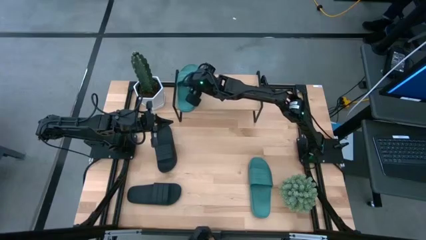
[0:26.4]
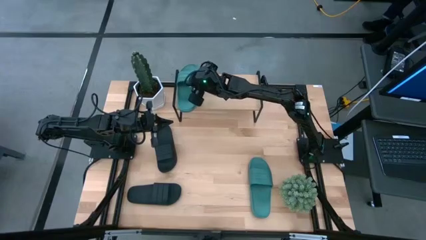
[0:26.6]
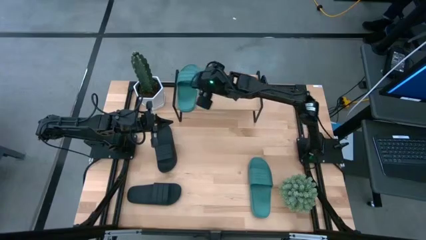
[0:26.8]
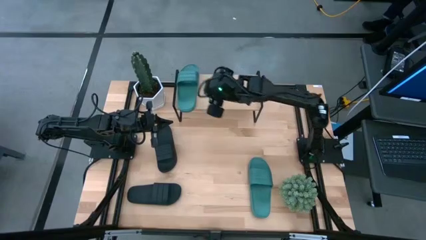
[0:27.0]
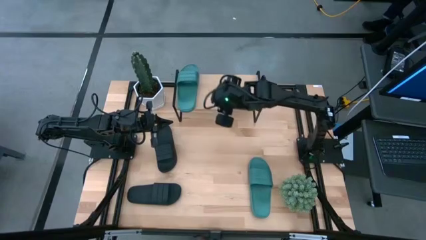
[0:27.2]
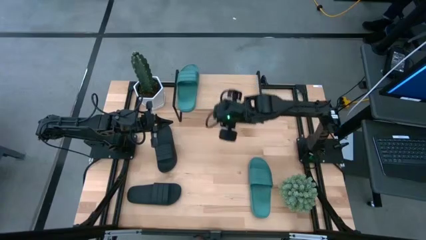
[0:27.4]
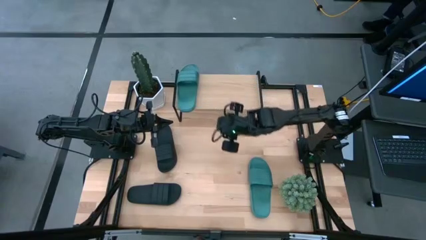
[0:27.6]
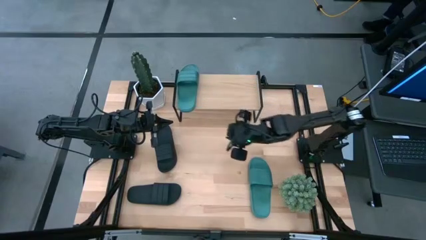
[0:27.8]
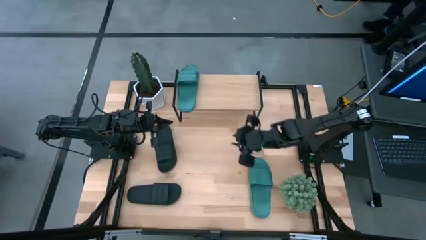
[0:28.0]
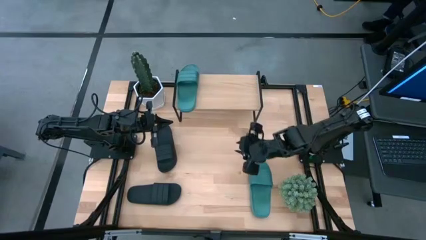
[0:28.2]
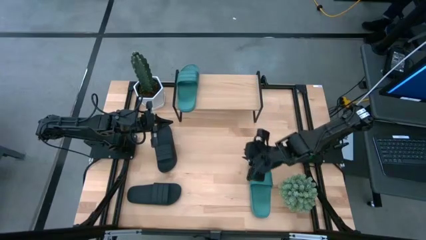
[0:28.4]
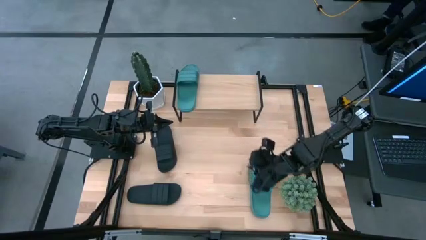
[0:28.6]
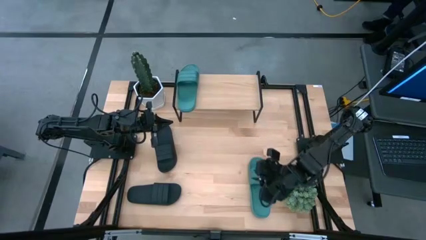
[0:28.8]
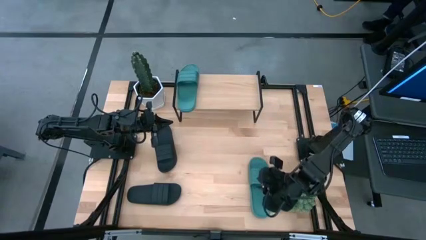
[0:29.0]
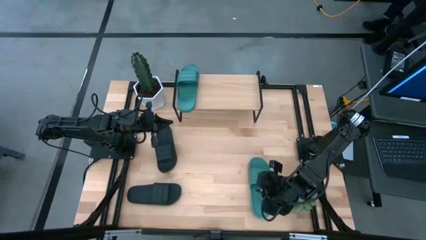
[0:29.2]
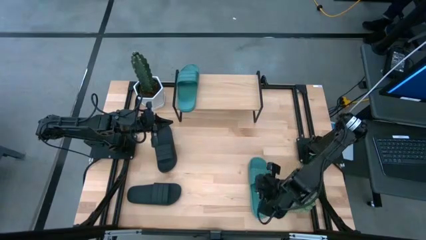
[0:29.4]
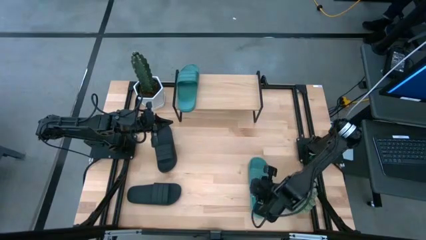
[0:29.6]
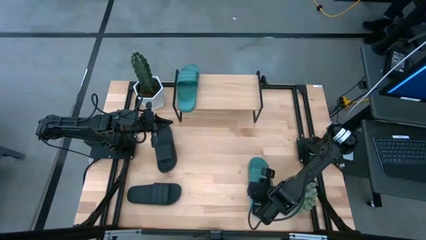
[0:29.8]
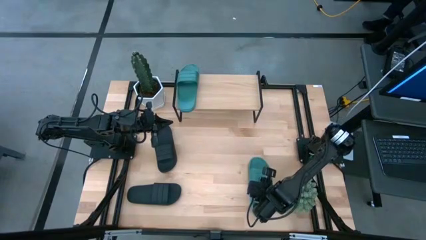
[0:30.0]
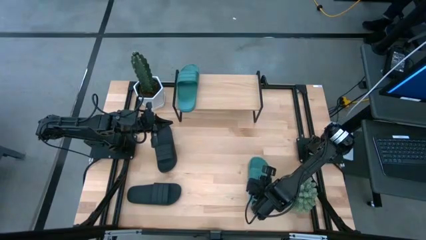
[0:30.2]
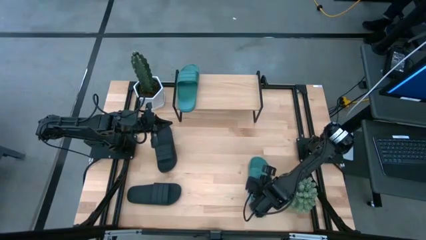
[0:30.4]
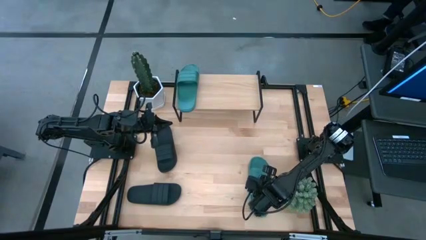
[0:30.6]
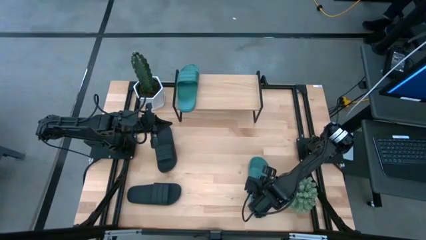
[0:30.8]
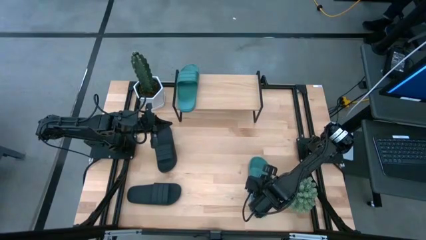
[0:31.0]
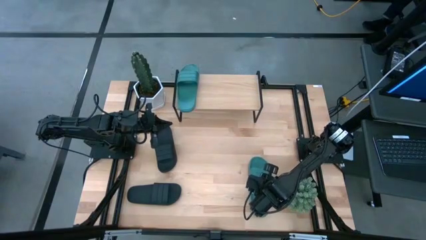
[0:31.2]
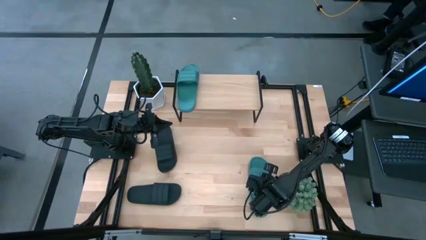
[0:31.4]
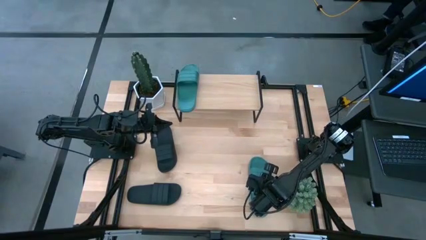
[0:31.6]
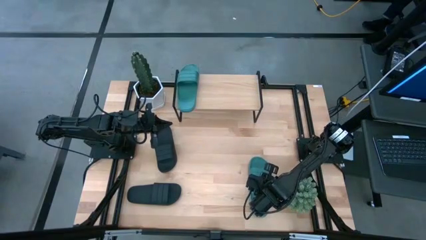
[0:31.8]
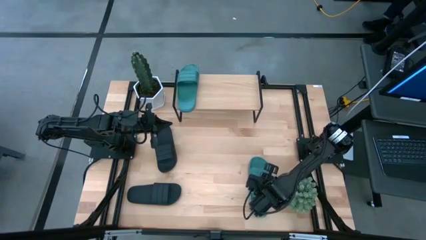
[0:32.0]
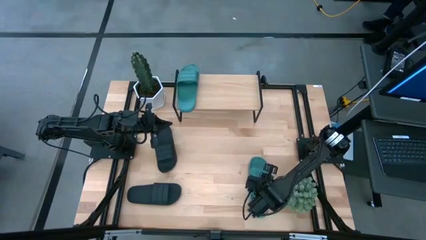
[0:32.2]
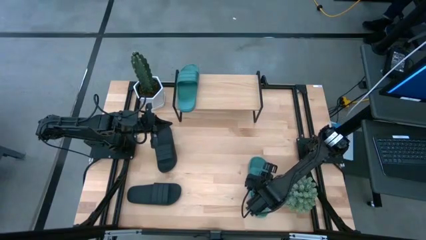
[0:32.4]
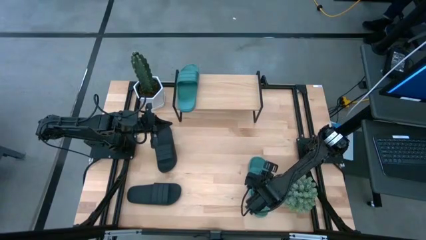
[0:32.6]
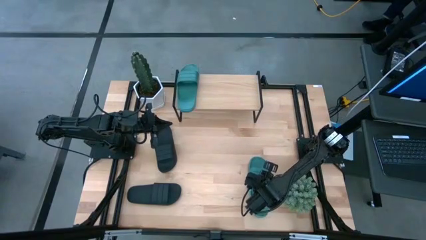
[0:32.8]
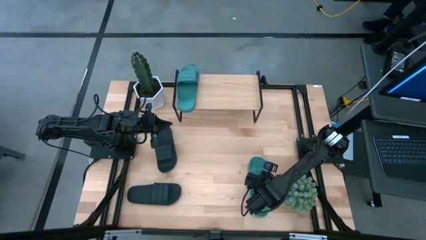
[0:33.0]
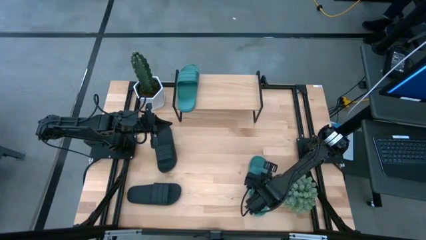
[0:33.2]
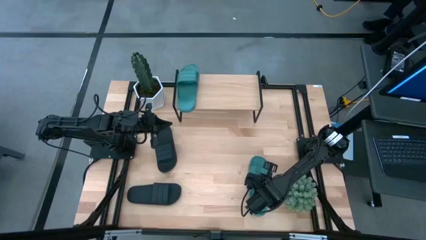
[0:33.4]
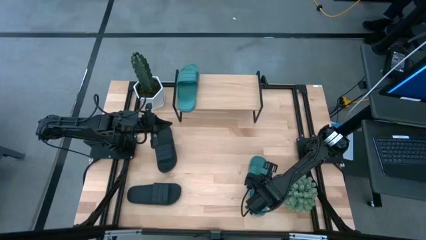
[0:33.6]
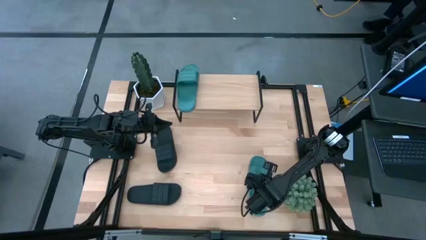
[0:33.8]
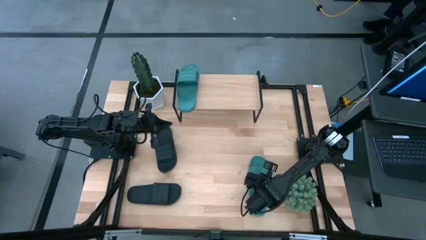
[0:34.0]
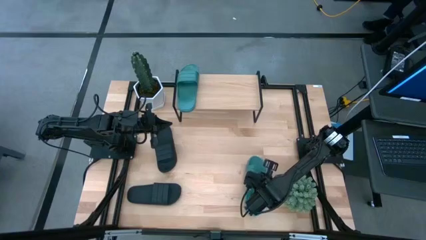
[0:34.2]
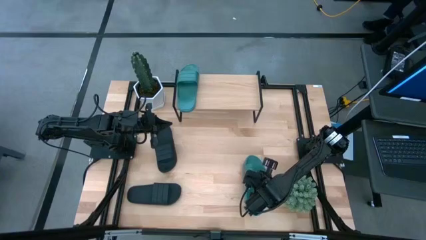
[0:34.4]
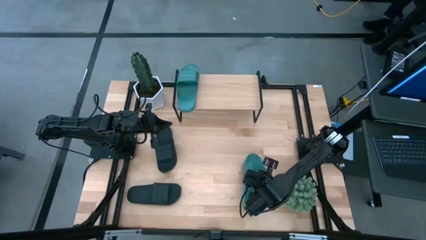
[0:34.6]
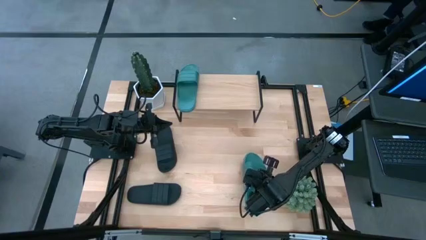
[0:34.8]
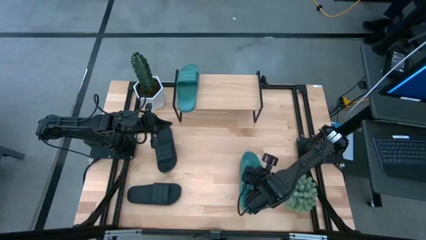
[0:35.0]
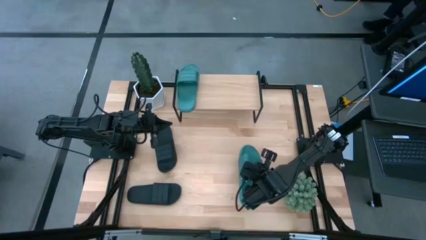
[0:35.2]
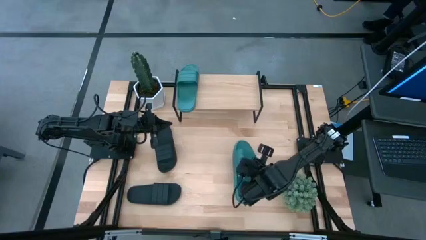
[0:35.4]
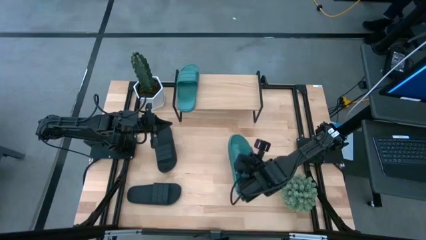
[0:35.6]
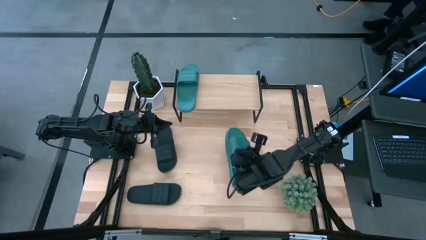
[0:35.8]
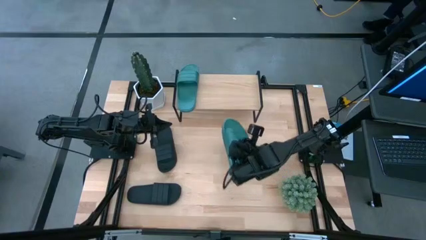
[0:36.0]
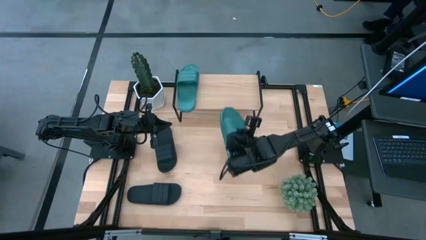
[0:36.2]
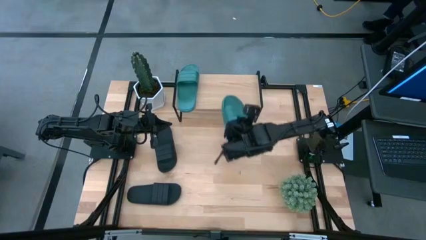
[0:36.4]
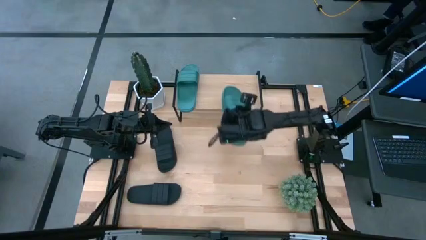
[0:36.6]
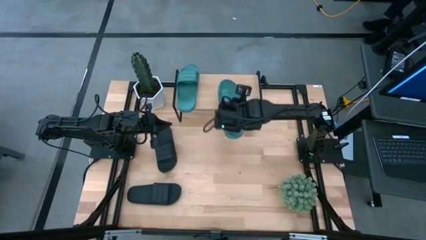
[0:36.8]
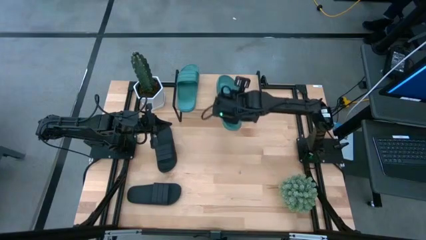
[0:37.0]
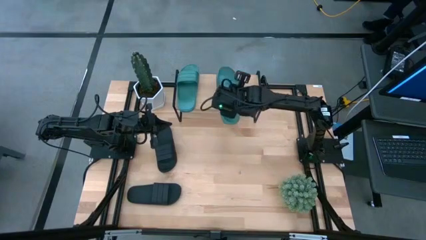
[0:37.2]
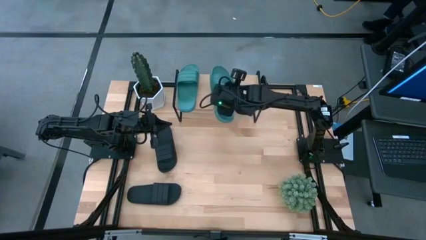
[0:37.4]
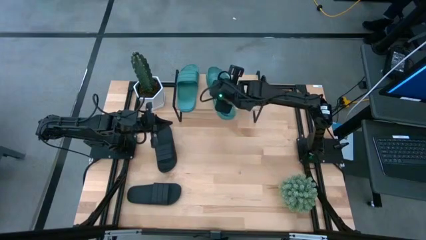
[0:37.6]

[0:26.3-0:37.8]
Task: Pick and place slides into the shelf
Put the green slipper on the shelf

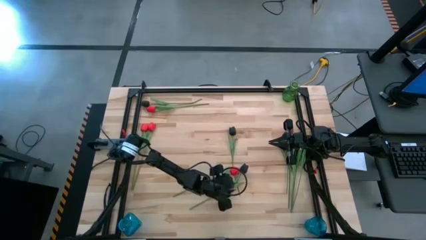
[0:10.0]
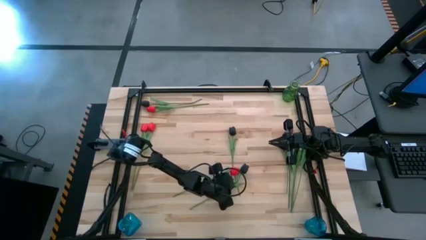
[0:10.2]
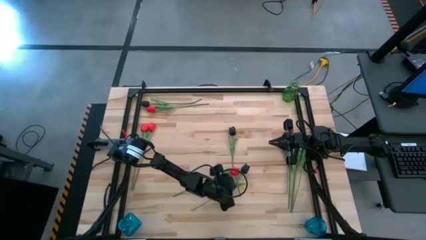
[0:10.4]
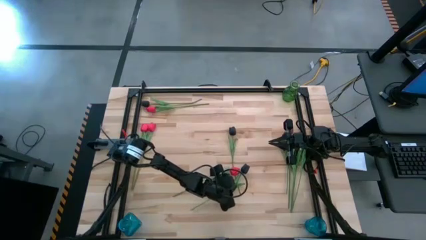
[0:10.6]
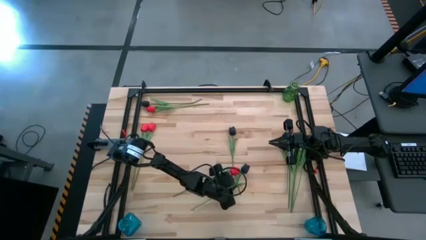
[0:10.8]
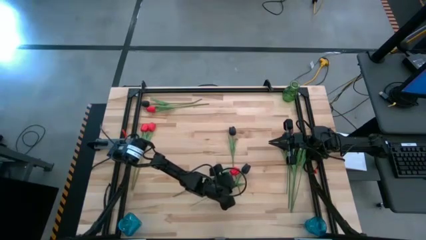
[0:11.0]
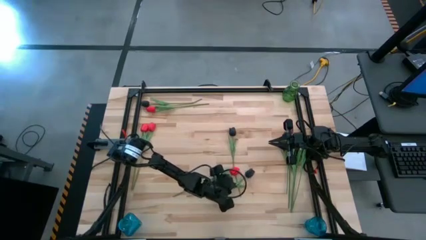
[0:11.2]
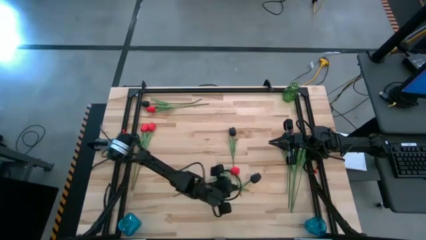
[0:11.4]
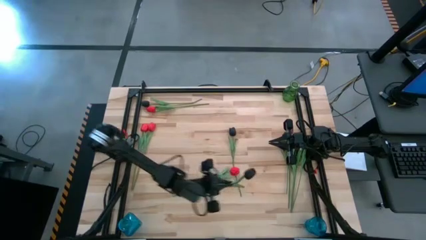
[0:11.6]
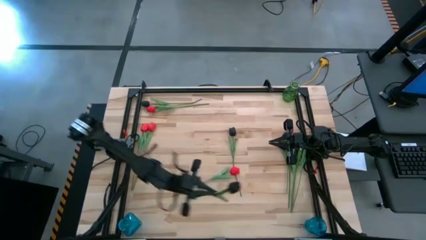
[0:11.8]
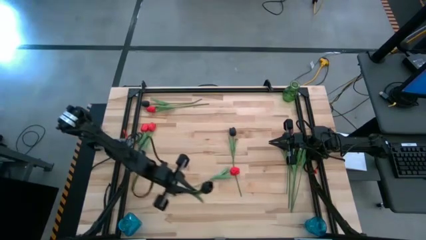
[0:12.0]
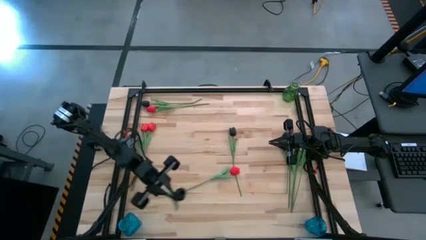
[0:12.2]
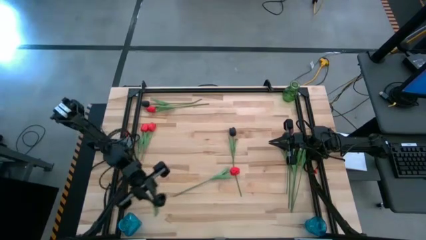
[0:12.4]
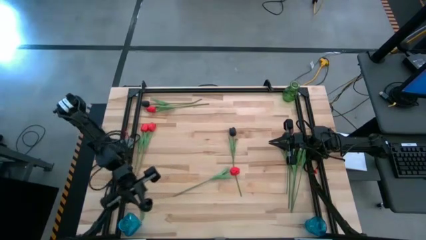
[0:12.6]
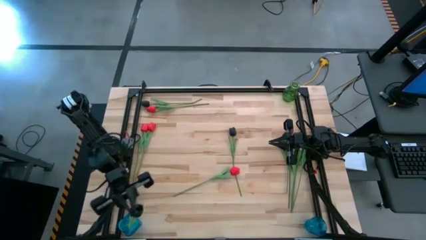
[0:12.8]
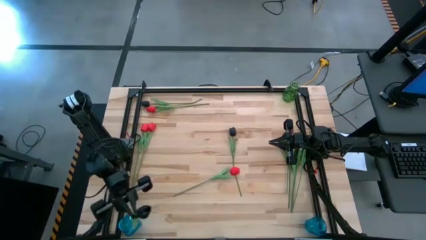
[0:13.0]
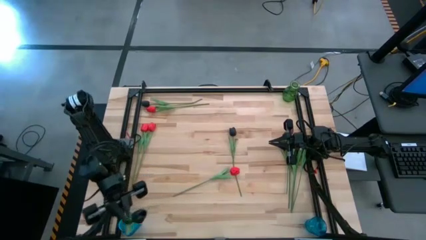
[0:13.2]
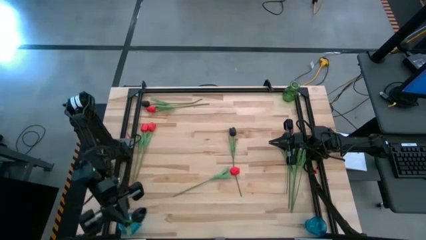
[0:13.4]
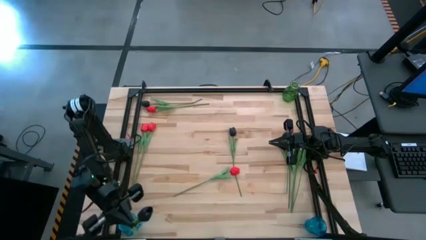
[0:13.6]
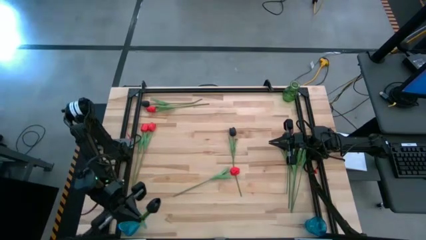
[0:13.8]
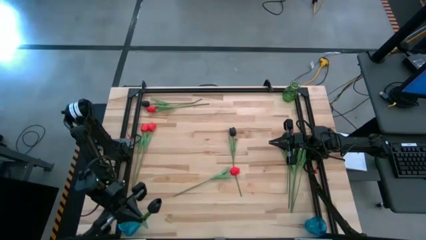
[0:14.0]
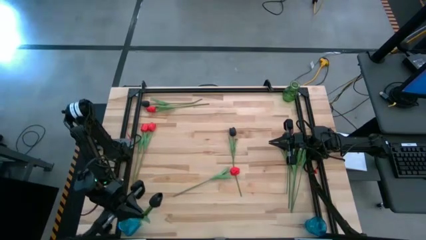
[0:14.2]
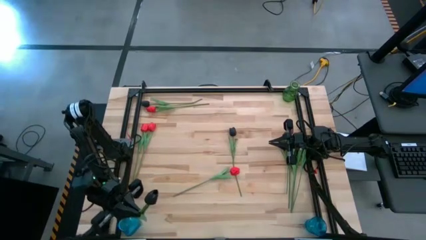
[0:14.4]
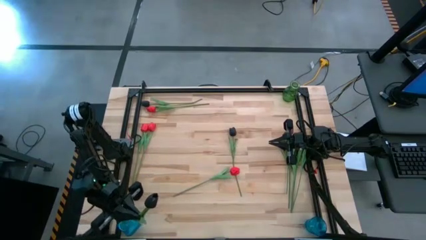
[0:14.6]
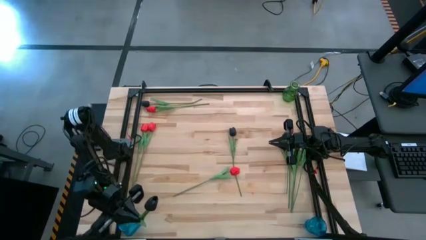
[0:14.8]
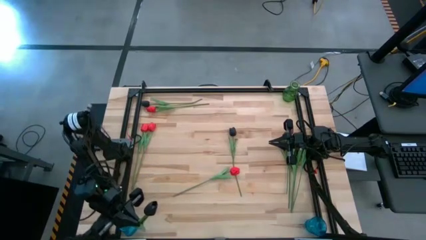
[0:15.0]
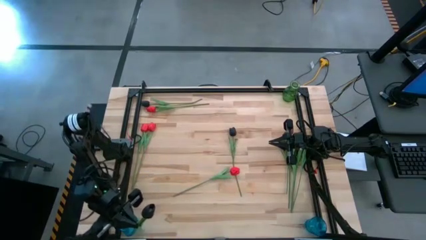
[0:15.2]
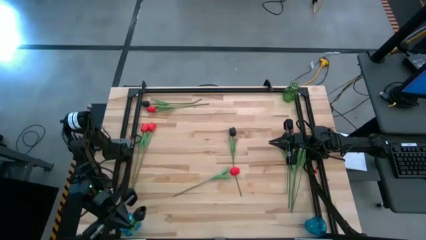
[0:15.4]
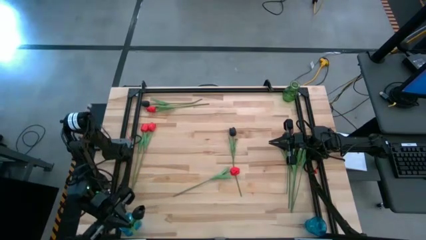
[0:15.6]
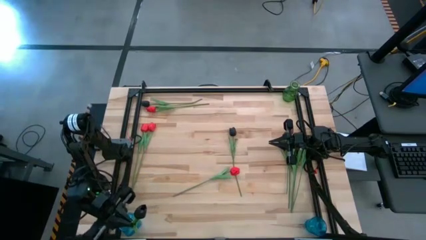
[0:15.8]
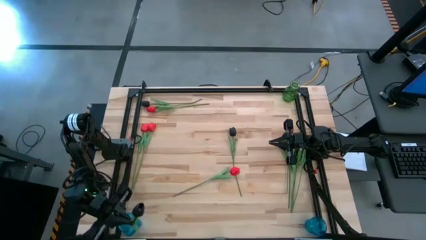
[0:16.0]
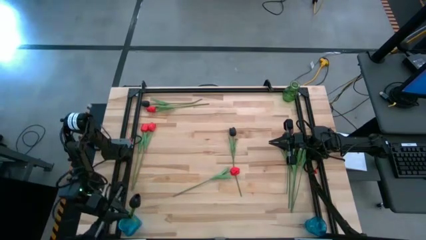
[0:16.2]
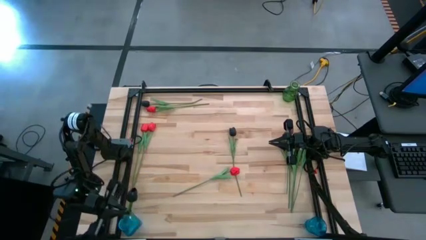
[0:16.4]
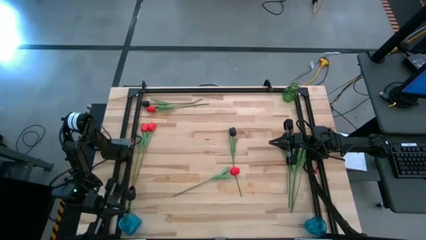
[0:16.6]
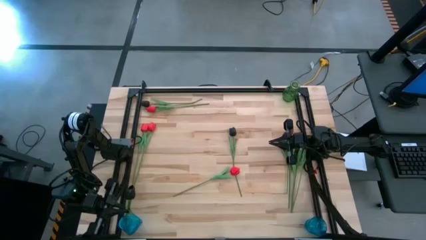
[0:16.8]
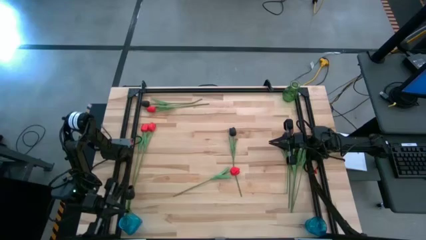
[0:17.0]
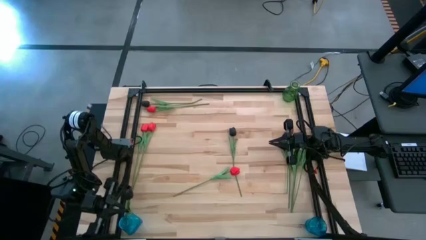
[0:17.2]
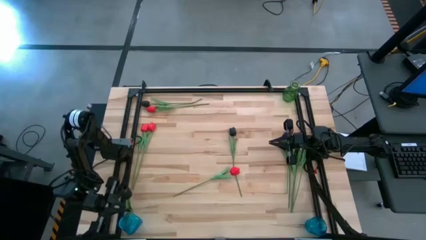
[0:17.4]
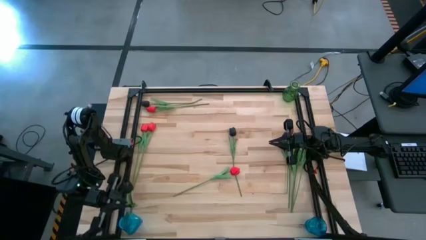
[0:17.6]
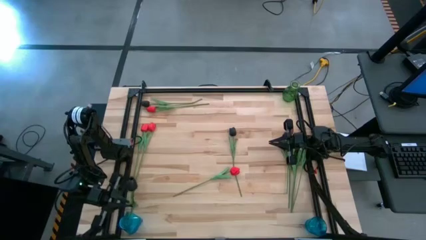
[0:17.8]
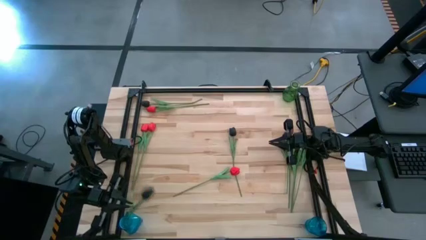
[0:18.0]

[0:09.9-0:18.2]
Task: Sort flowers into vase by color
Put the black tulip into the left blue vase
